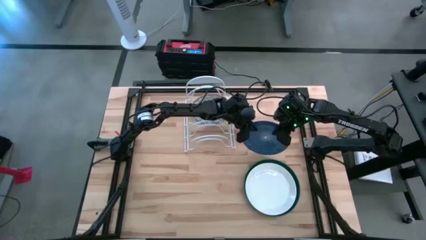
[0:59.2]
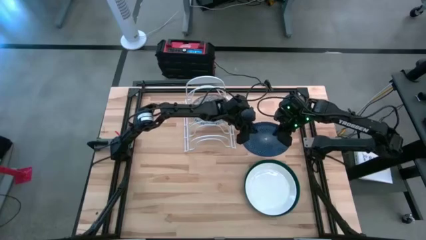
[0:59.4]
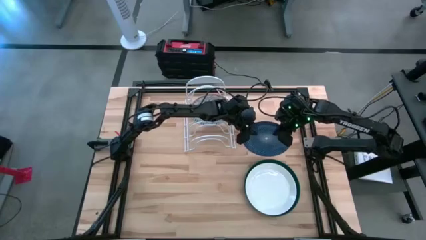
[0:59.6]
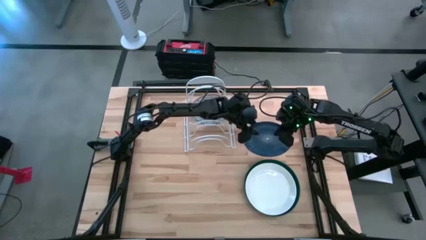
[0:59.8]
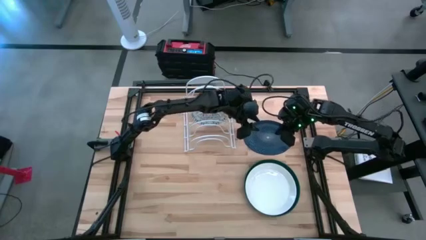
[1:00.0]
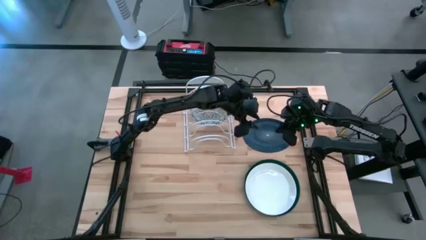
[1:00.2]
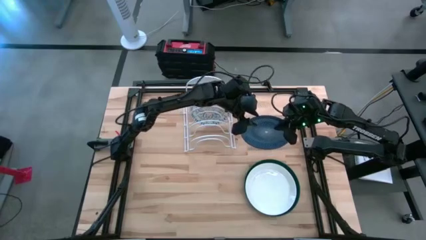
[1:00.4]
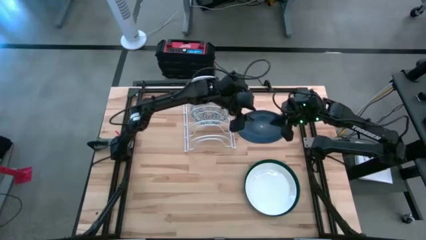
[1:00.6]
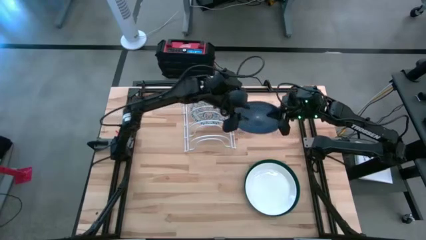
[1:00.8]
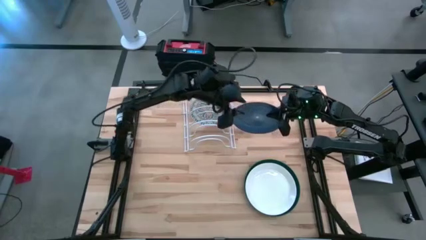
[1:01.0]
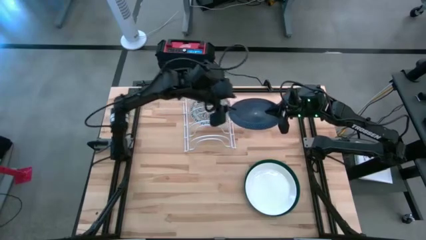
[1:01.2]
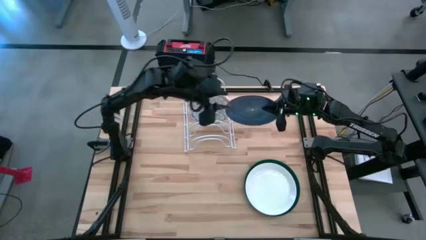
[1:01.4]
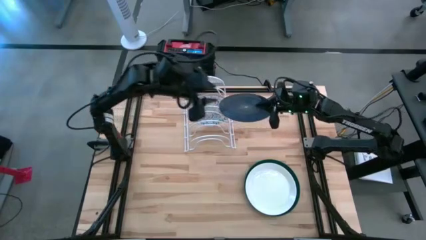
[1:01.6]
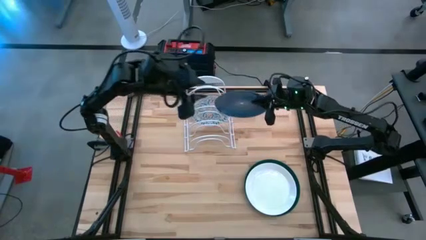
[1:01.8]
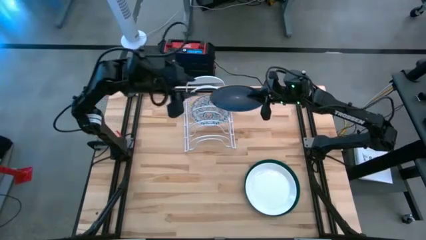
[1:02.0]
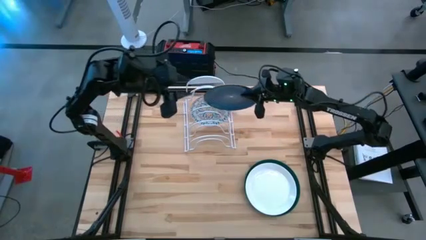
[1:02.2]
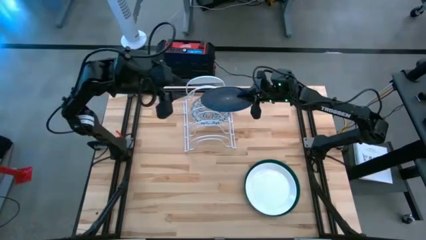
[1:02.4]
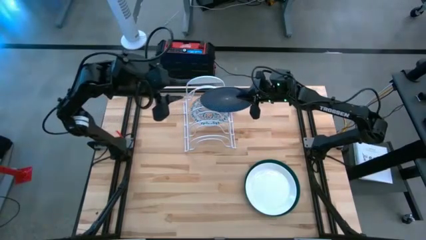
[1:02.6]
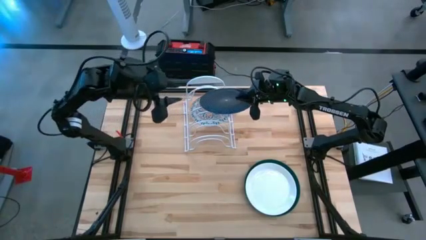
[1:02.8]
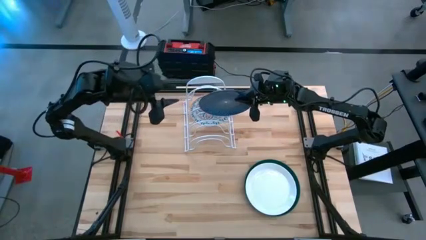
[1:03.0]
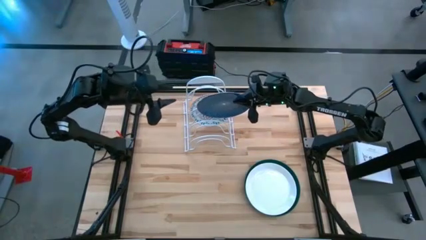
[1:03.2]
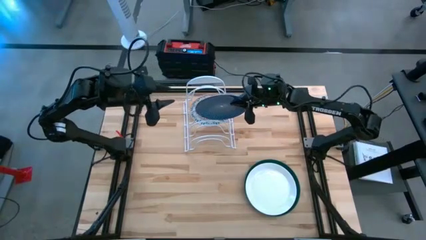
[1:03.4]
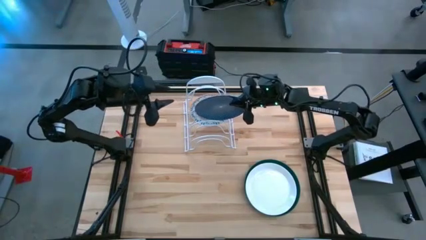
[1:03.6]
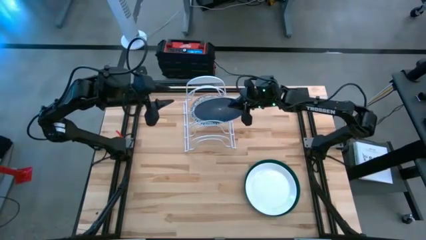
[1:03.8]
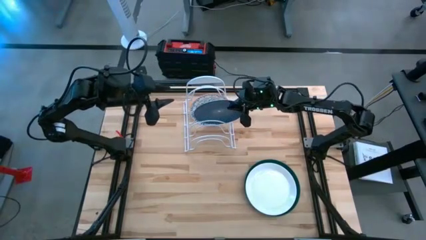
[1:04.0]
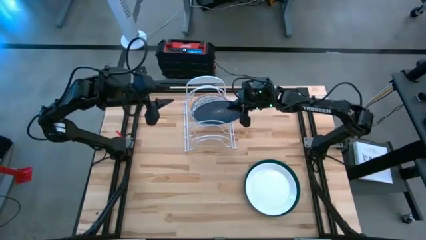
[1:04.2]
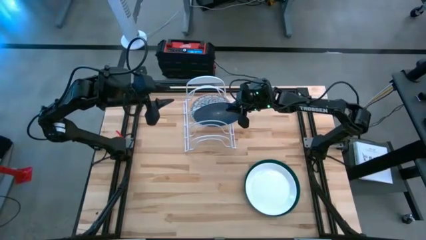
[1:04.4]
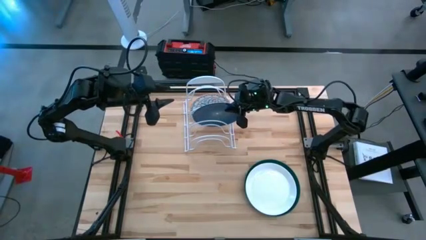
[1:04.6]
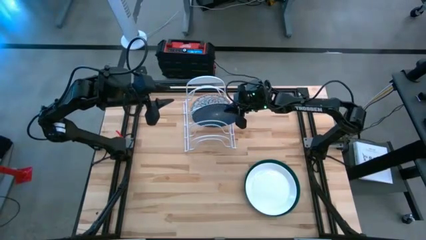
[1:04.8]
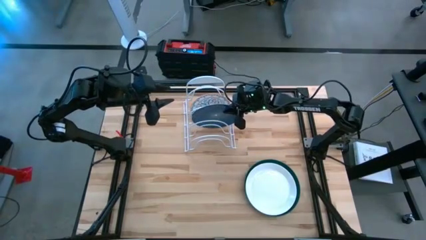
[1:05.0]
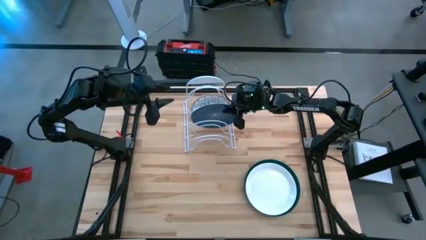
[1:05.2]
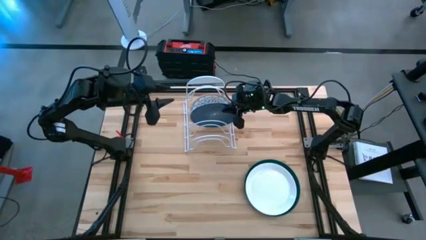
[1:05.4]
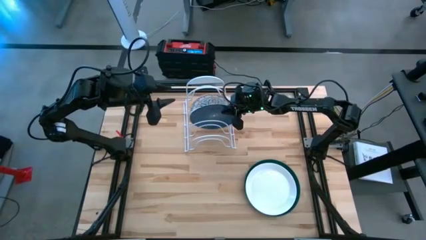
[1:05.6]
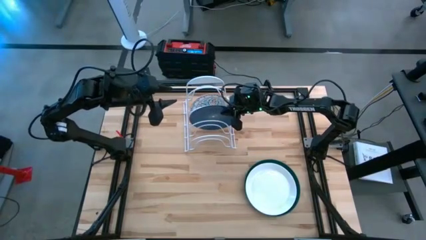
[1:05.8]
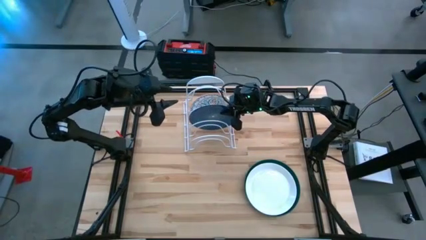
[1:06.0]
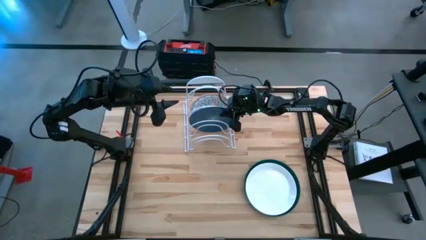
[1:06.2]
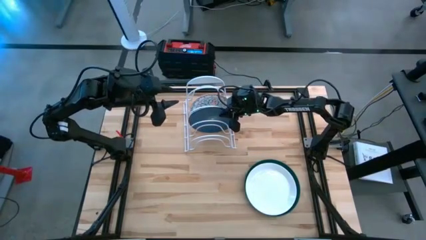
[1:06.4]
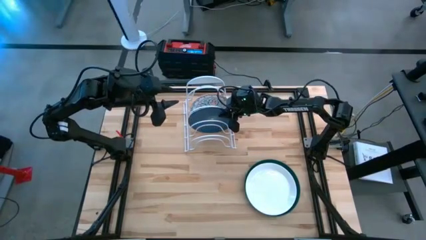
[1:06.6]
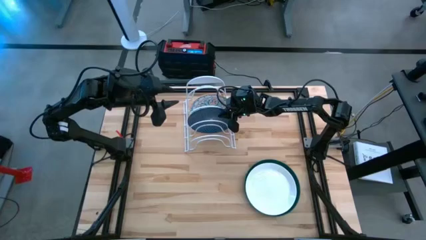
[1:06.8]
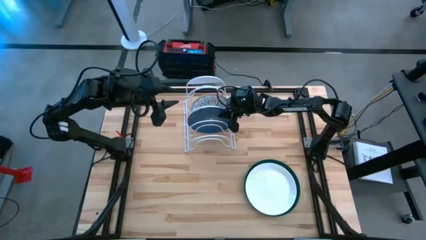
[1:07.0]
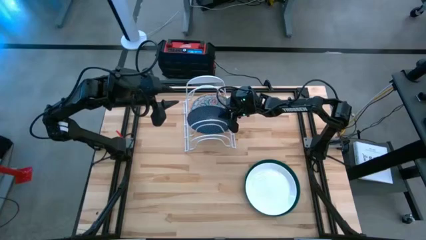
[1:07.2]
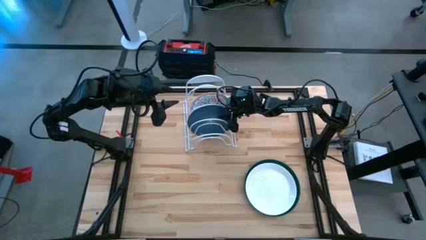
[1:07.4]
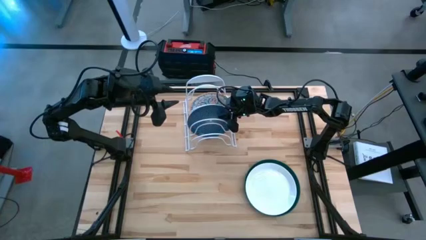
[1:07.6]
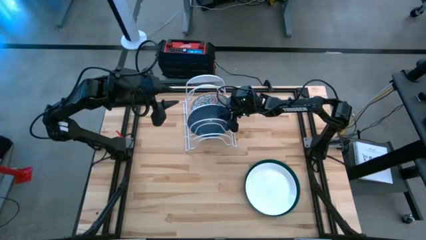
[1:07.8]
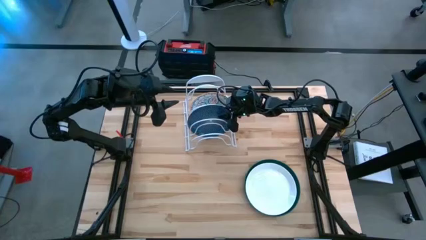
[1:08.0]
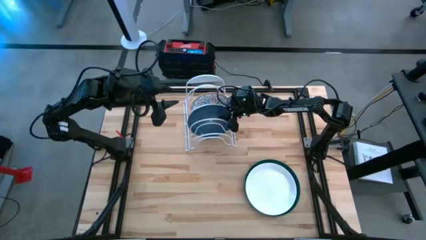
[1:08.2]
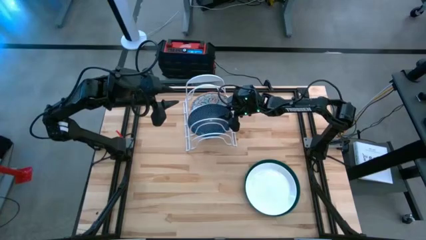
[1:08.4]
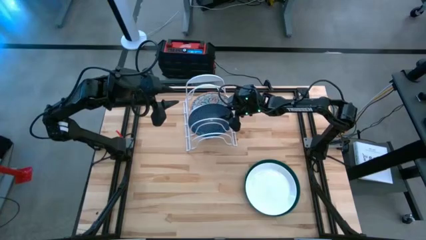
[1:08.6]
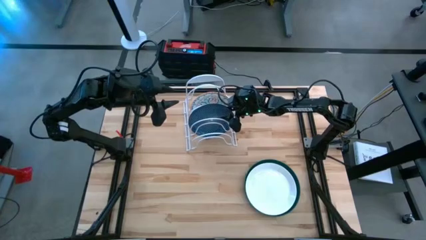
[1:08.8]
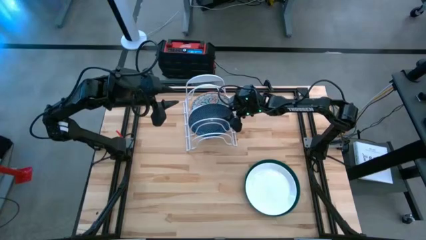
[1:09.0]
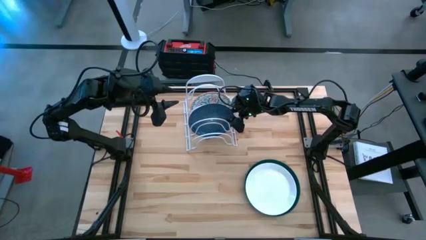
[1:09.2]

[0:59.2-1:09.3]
Task: Sort dishes
Put the blue patterned plate into the dish rack

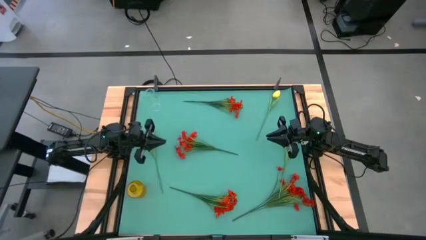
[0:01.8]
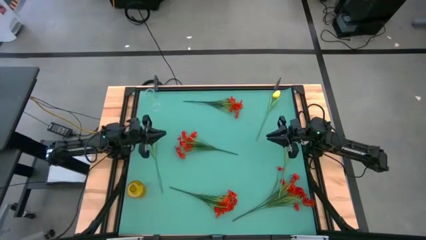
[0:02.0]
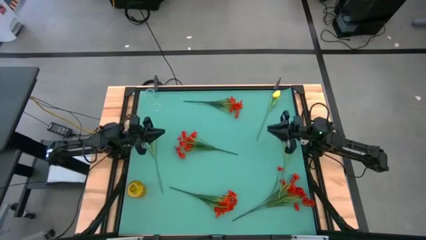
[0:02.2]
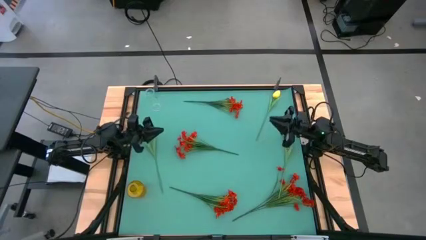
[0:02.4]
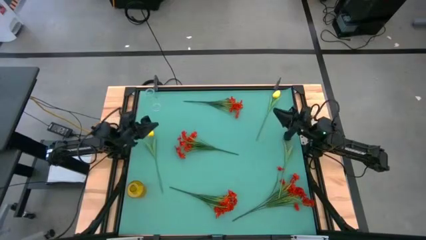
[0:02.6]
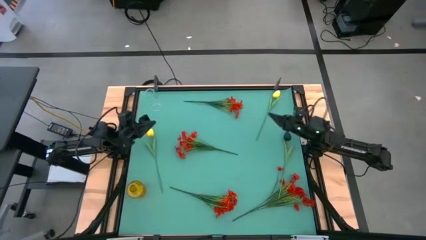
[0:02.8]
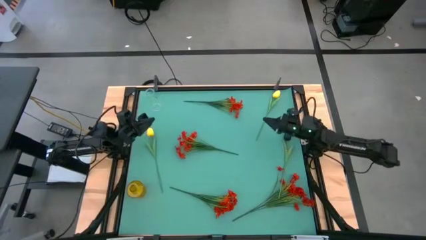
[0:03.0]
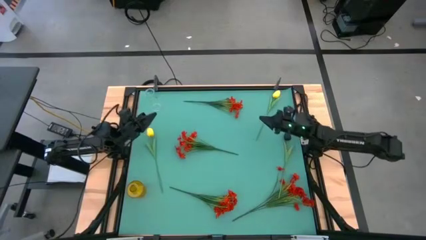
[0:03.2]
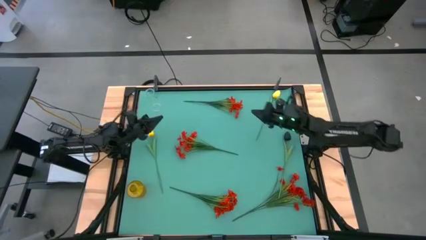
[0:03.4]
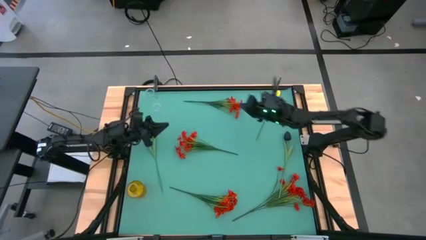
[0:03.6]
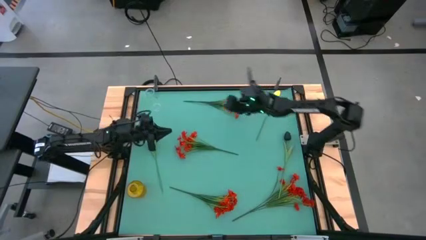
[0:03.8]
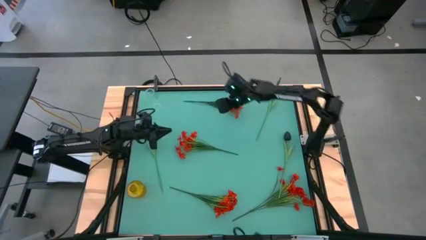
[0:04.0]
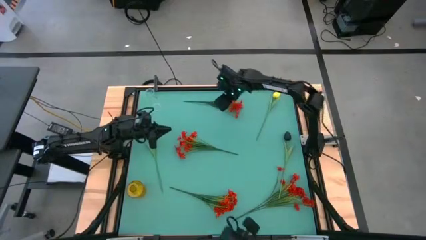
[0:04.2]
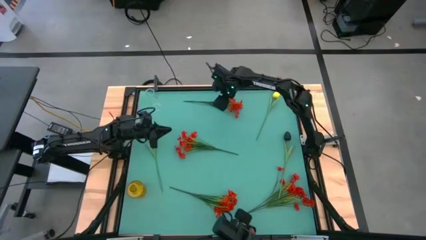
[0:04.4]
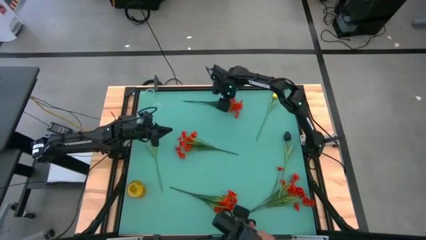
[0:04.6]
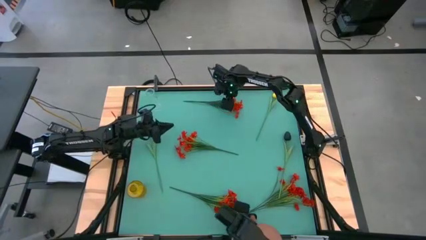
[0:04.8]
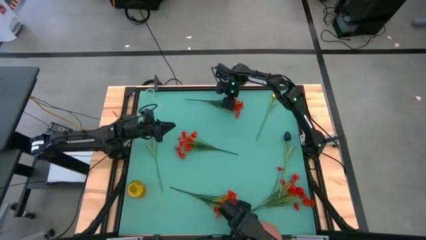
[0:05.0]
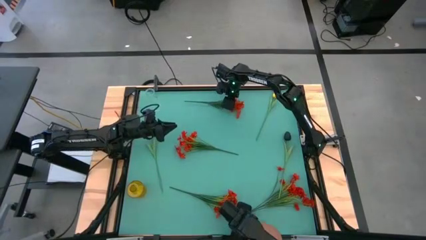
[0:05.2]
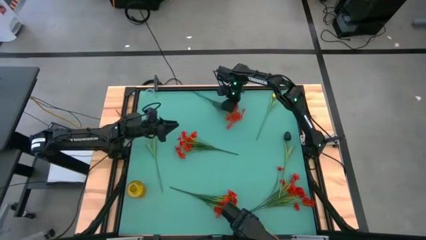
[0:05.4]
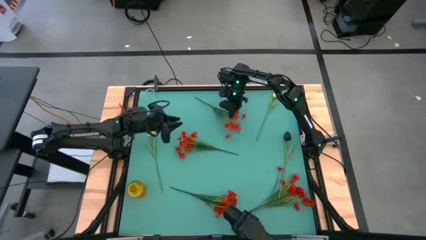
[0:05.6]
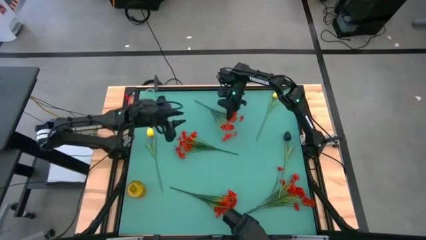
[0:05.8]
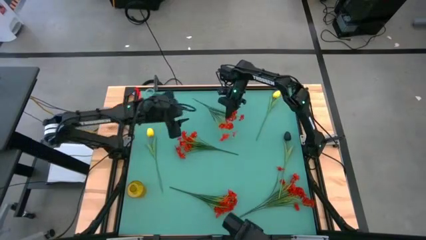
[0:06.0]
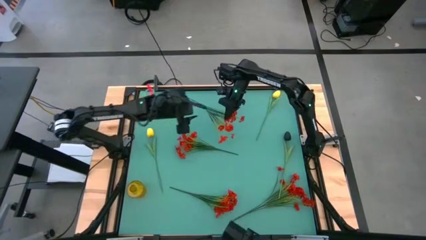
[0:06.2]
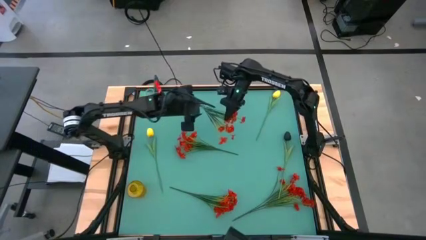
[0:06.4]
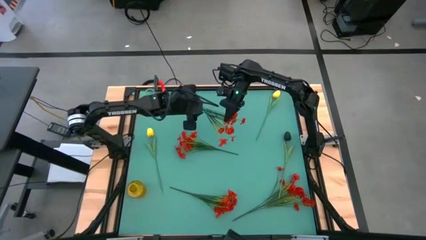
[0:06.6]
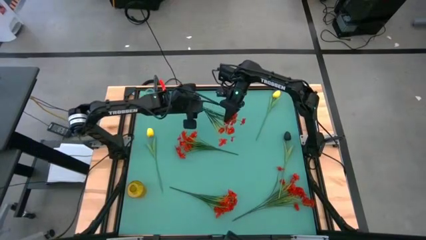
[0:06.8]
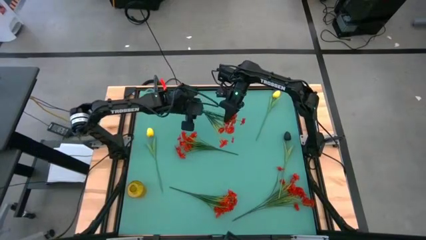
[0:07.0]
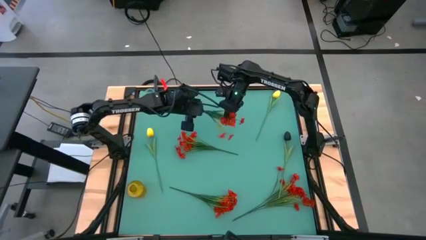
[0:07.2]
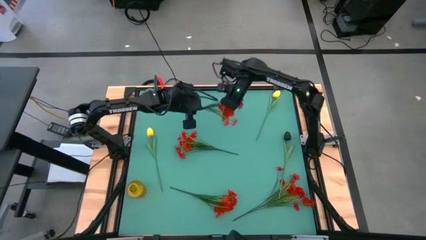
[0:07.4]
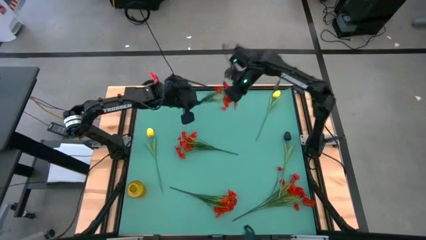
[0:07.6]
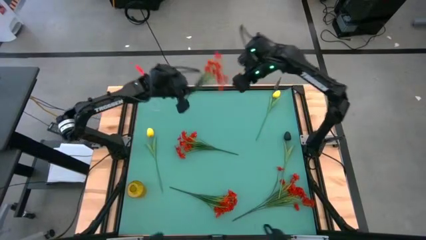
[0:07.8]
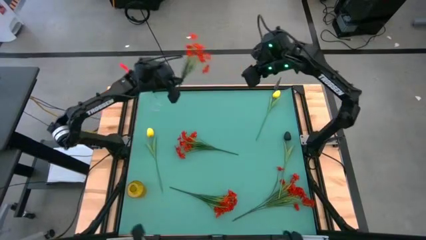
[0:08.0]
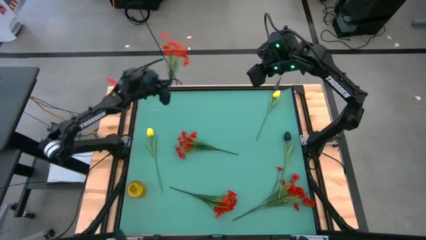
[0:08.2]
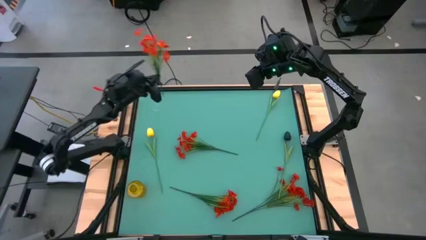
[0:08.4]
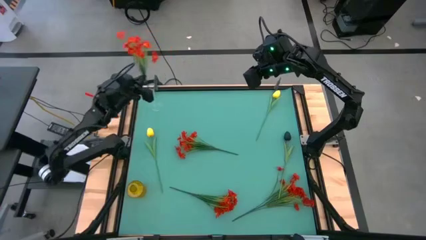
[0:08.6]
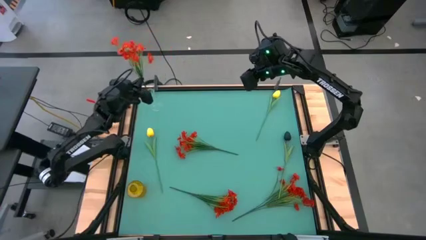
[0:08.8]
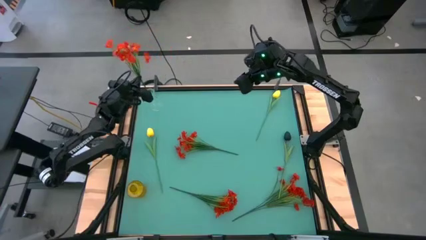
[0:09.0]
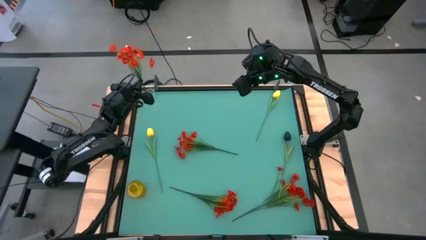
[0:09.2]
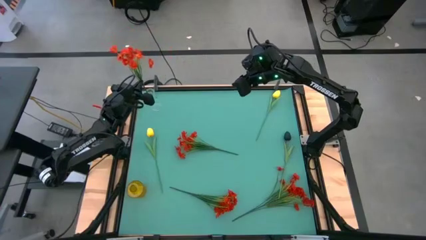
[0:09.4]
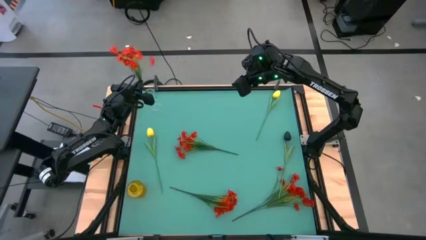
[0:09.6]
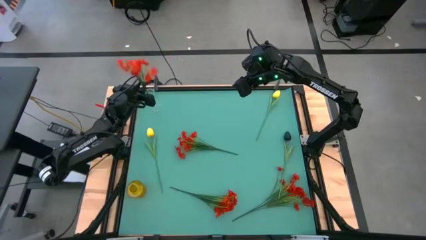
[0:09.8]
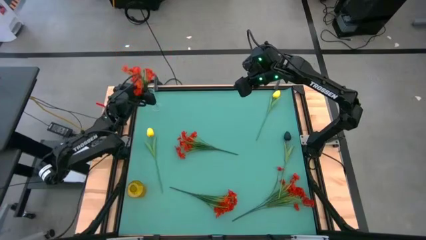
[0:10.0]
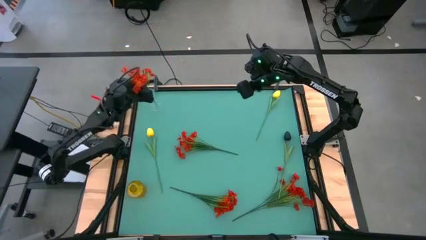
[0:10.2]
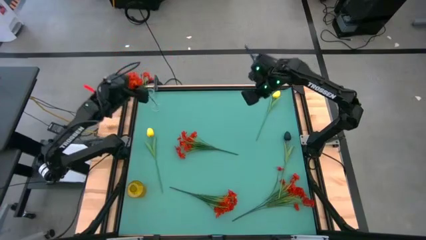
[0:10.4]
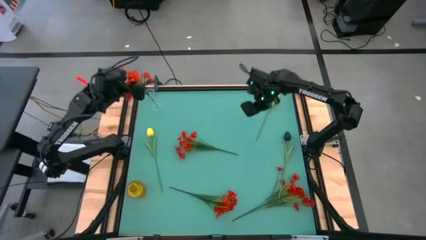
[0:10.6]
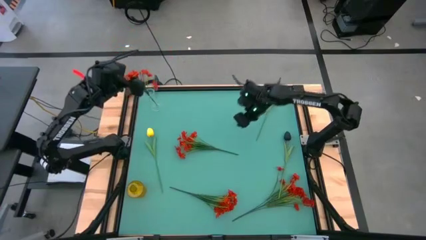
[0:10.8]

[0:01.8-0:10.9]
Task: Sort flowers into vase by color
Put the top center red flowers into the transparent vase
